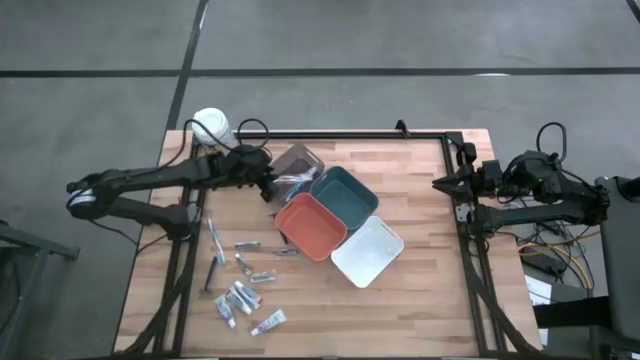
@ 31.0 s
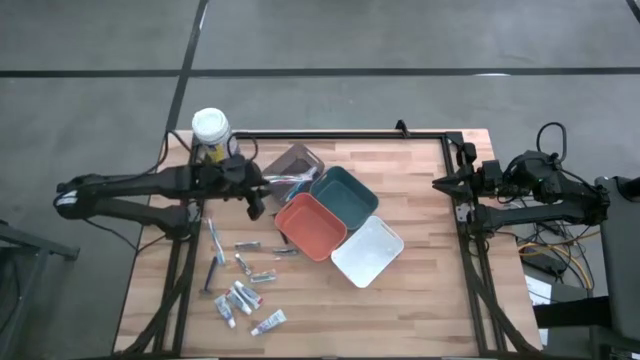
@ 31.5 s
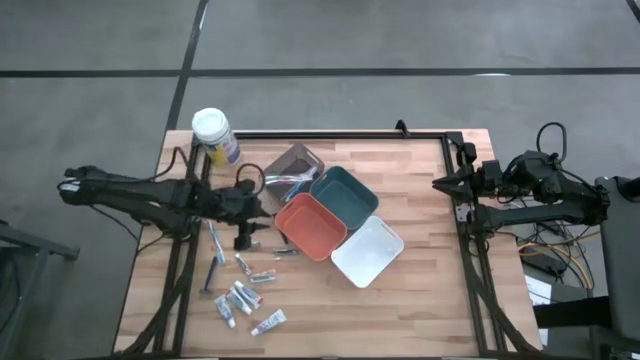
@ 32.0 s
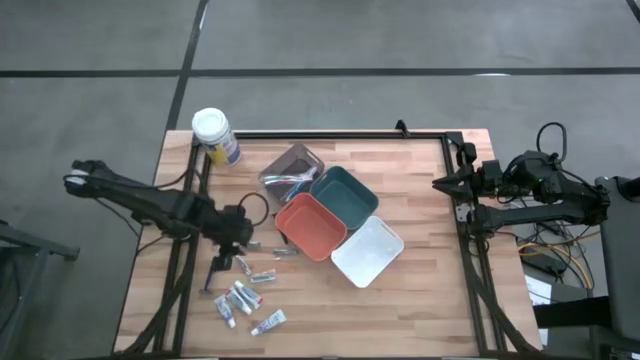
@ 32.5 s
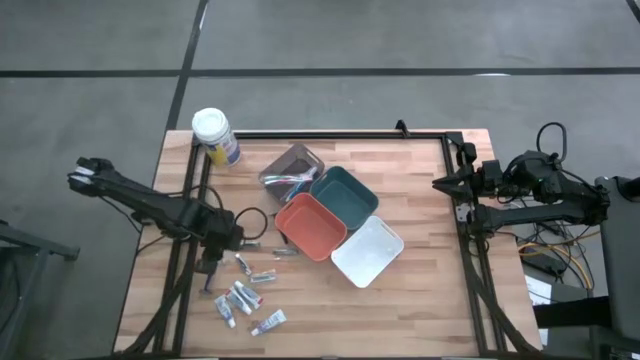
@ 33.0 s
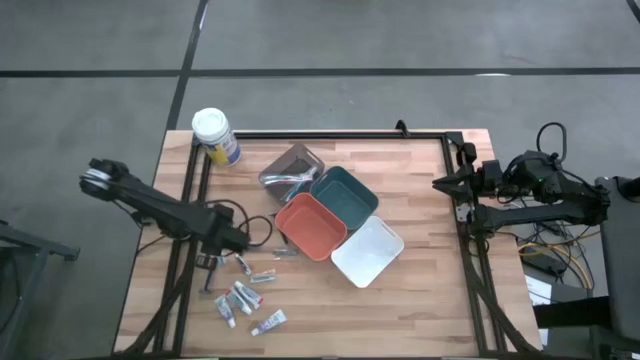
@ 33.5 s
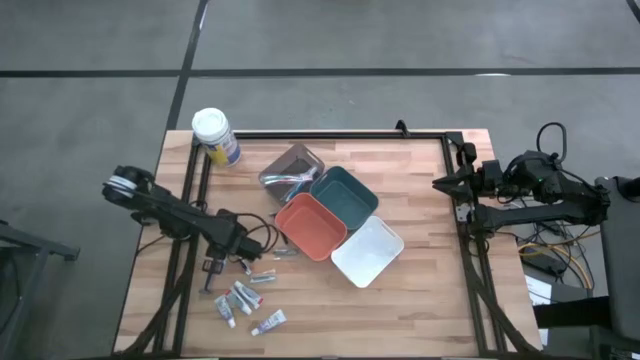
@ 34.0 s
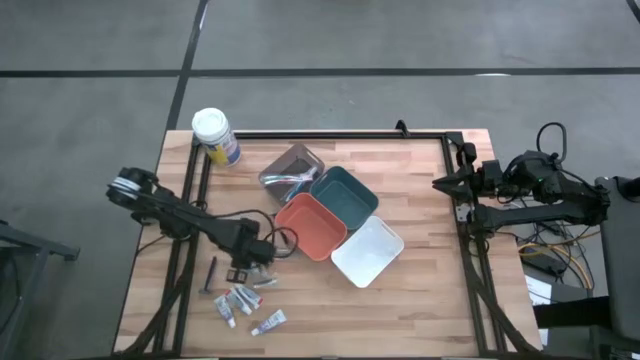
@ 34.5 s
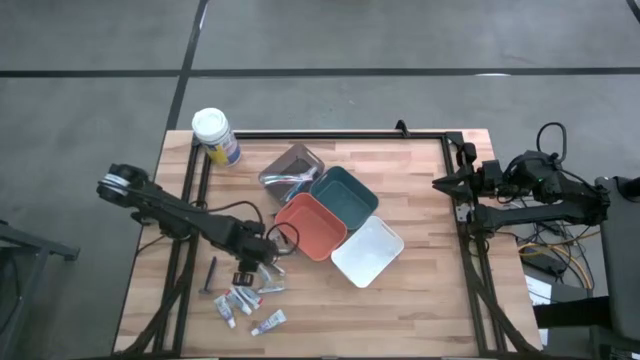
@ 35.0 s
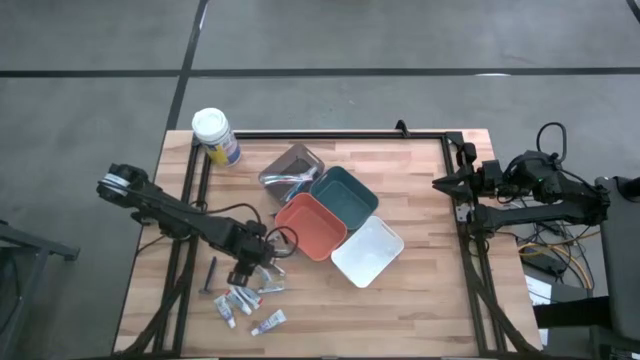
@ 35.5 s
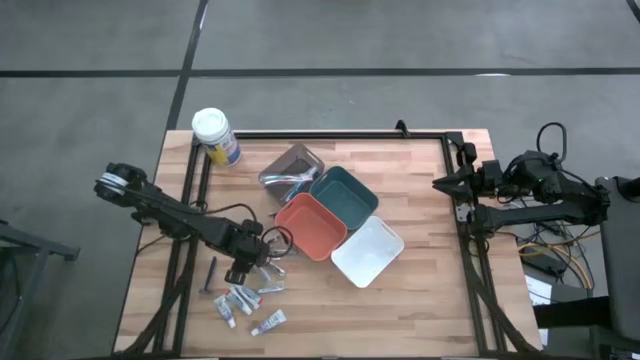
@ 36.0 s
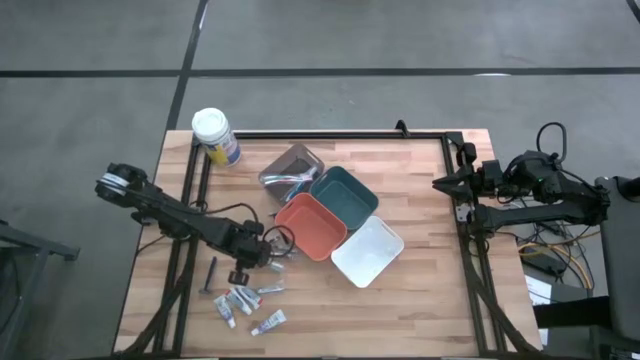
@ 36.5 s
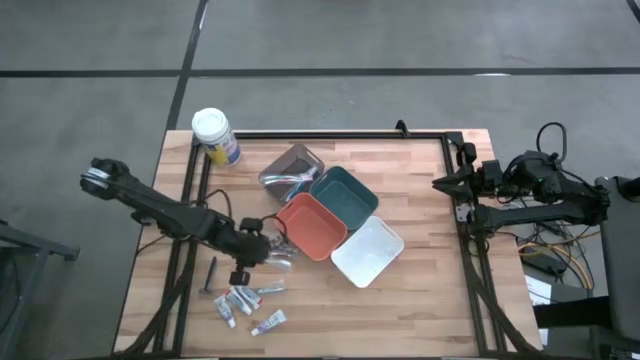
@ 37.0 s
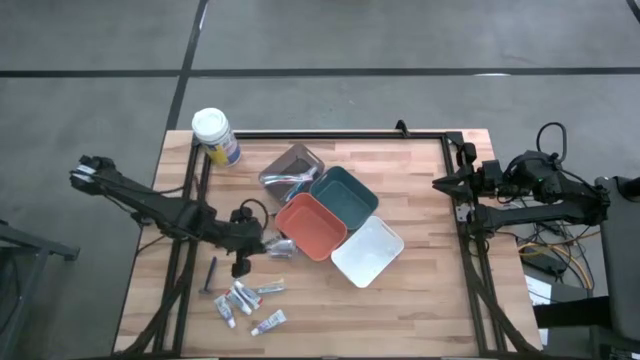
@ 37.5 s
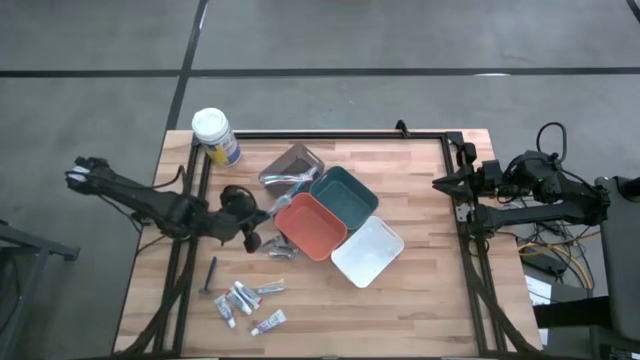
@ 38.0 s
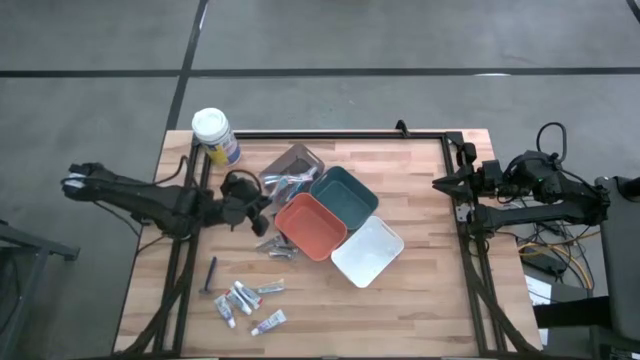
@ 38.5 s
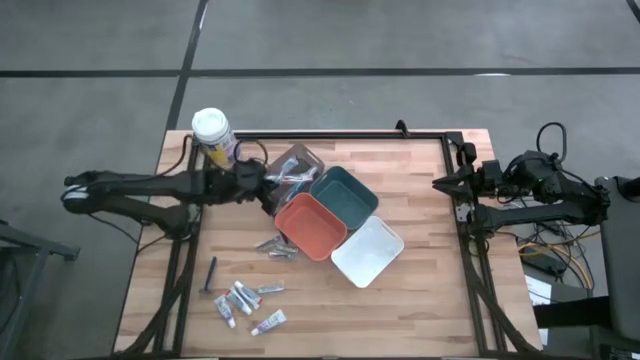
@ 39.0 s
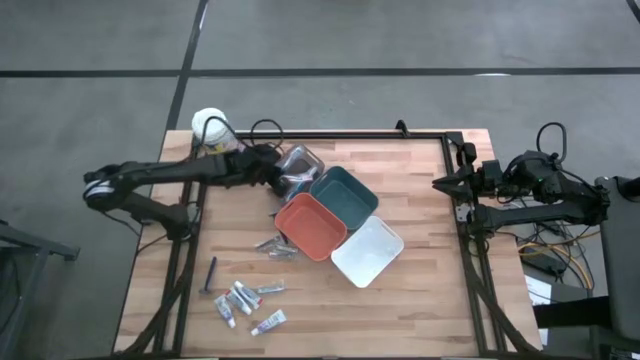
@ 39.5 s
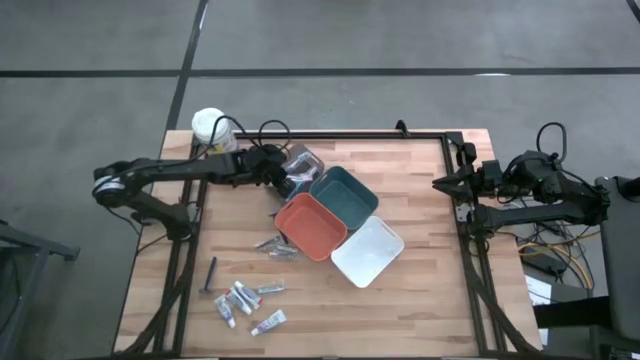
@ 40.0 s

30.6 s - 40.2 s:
Task: Pick & Place Travel size toiletries
Put the blue toothbrush into the black bin

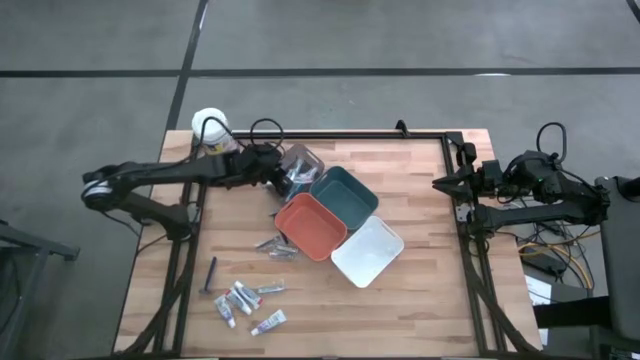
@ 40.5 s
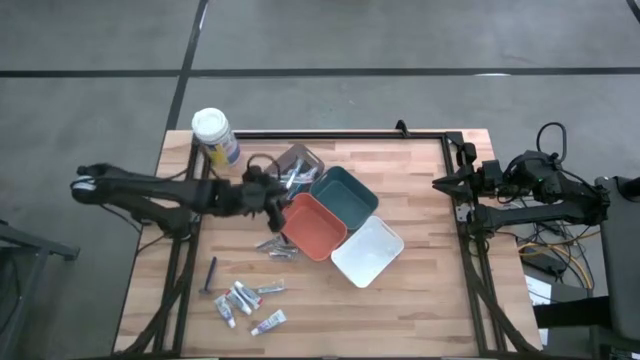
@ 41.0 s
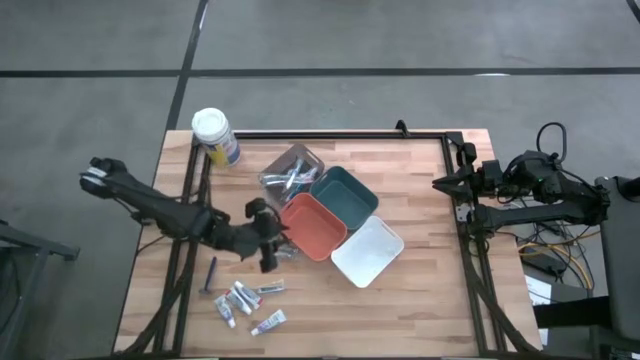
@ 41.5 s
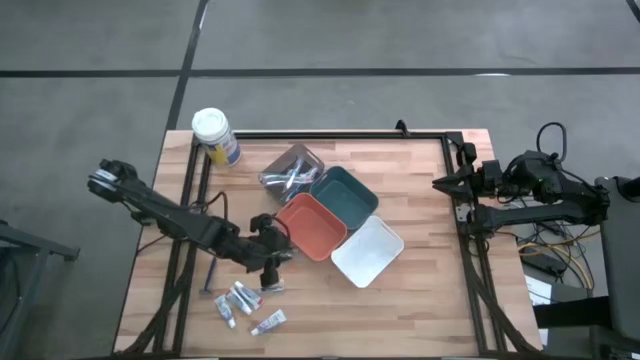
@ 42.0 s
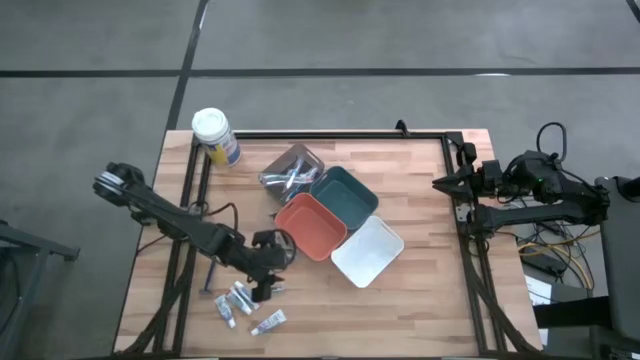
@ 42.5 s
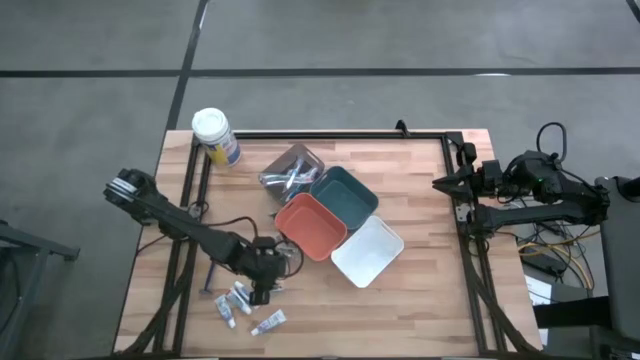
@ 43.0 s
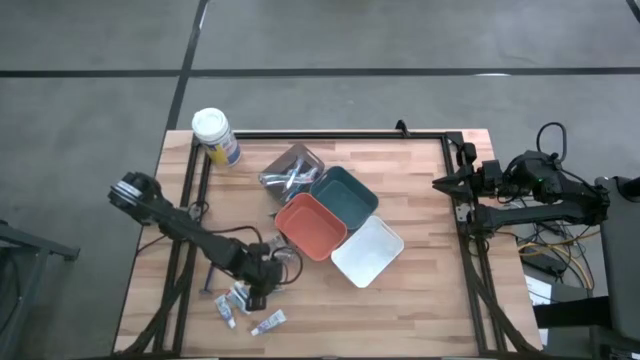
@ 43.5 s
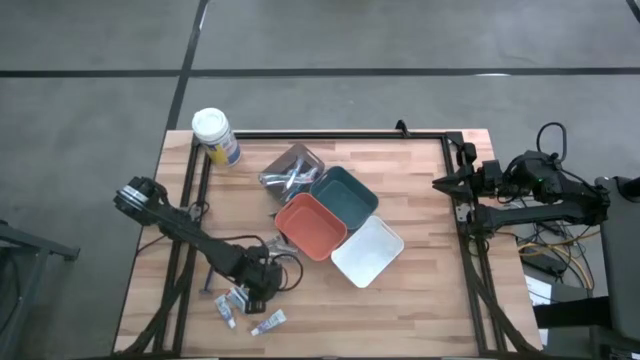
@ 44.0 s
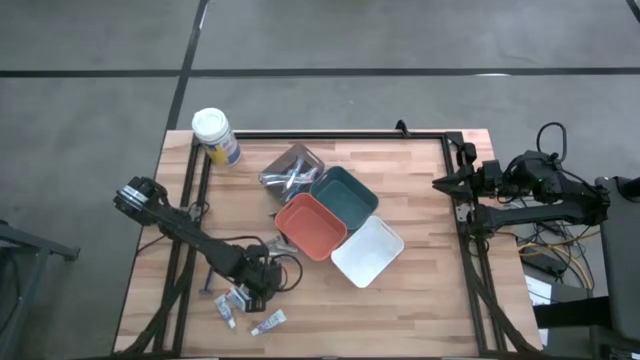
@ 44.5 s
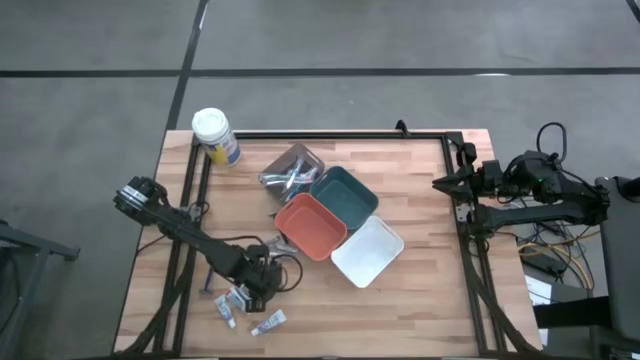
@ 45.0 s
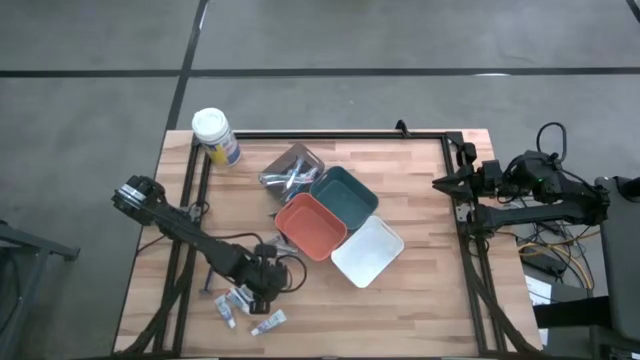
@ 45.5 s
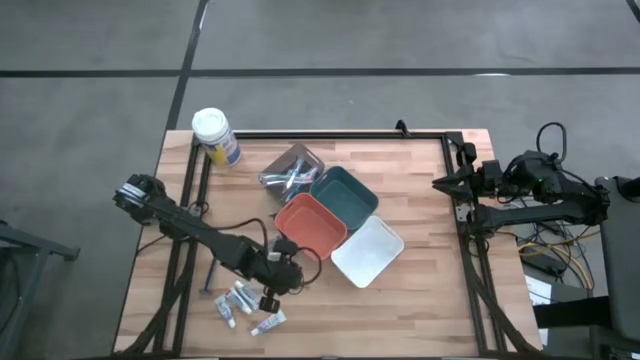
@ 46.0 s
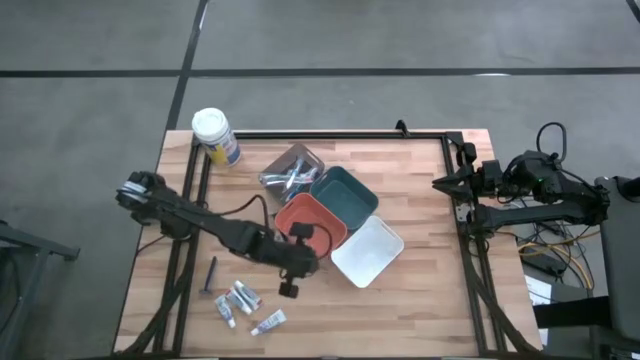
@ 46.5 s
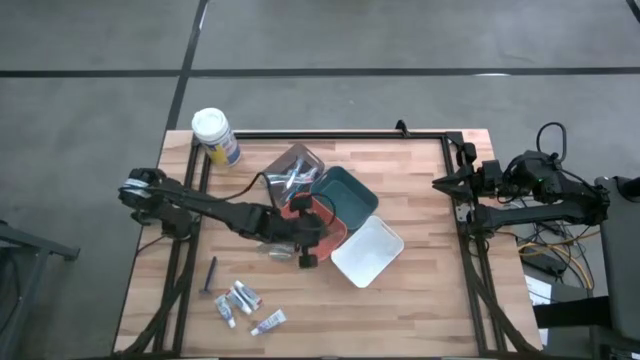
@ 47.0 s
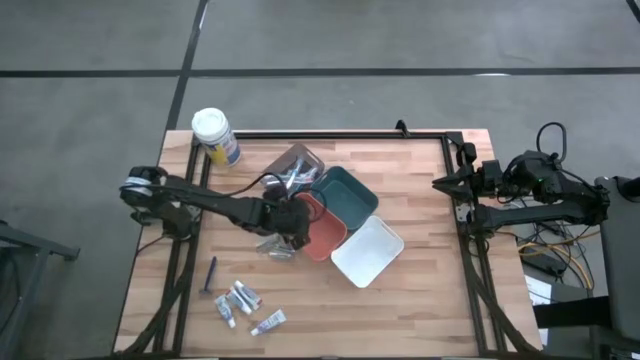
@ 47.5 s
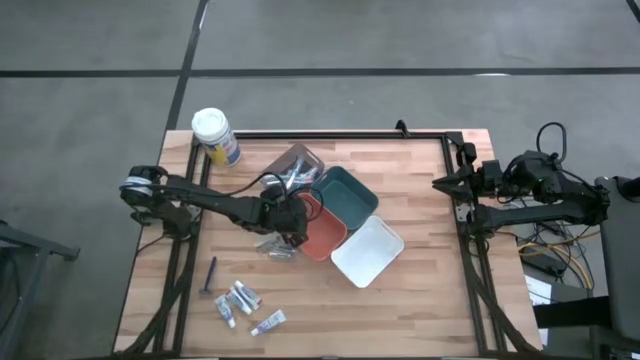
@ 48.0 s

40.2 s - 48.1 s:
Put the nail cutter into the orange bin

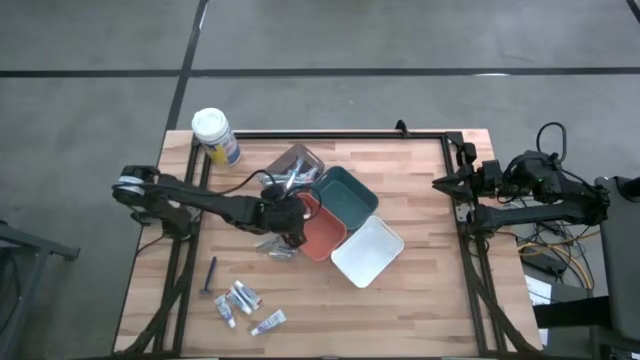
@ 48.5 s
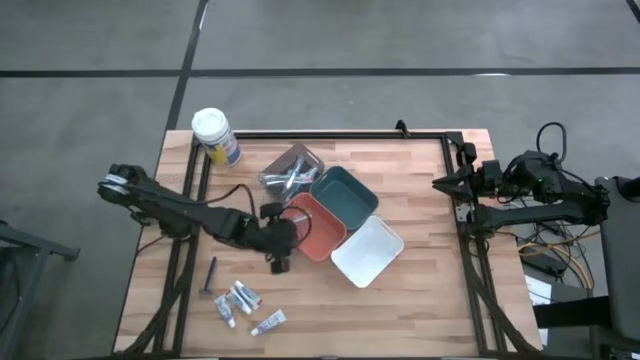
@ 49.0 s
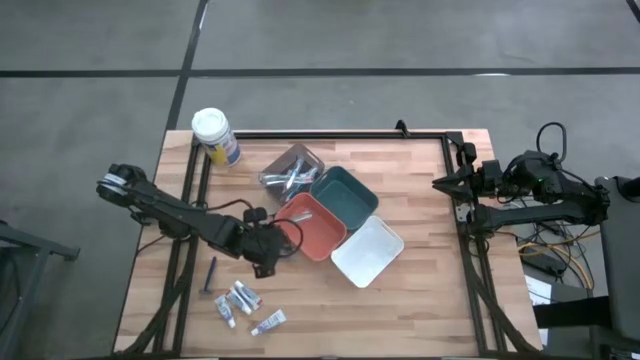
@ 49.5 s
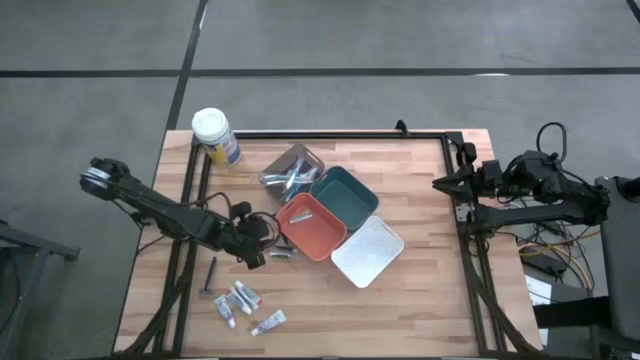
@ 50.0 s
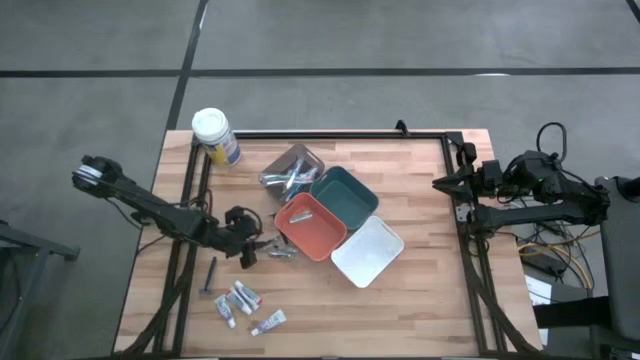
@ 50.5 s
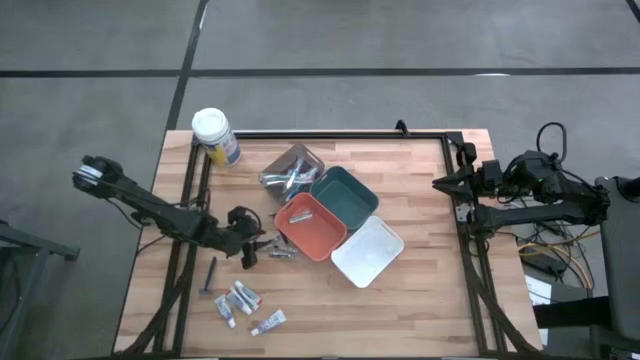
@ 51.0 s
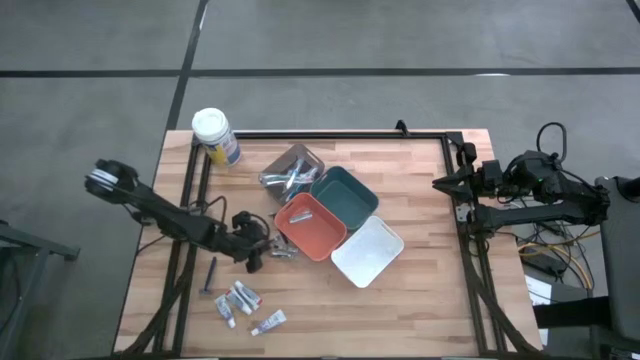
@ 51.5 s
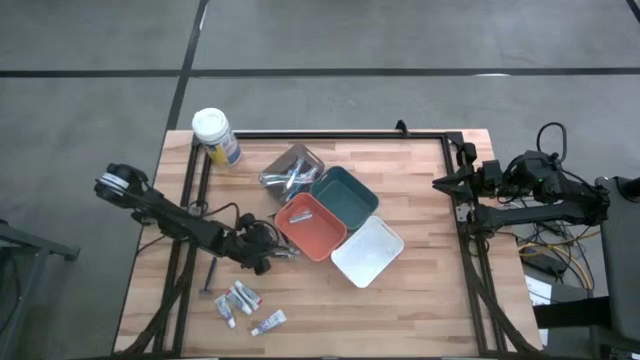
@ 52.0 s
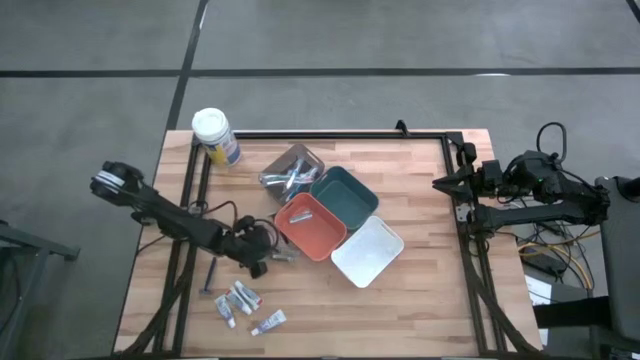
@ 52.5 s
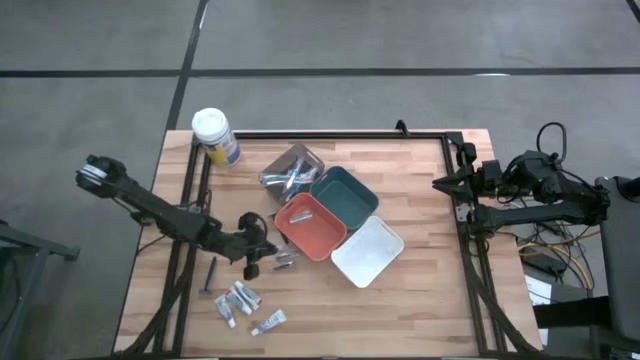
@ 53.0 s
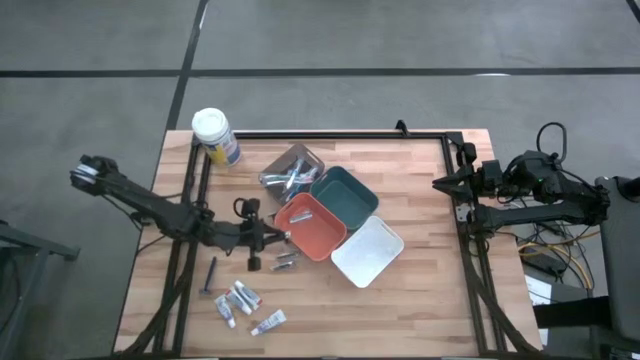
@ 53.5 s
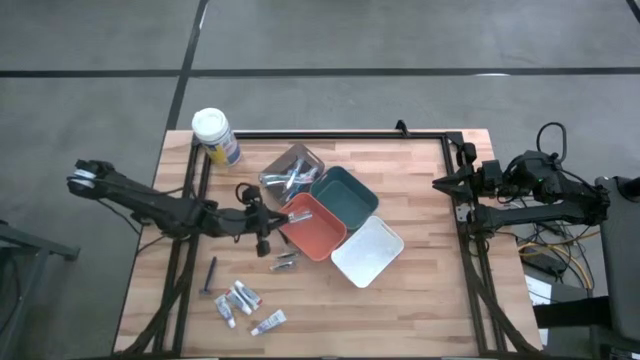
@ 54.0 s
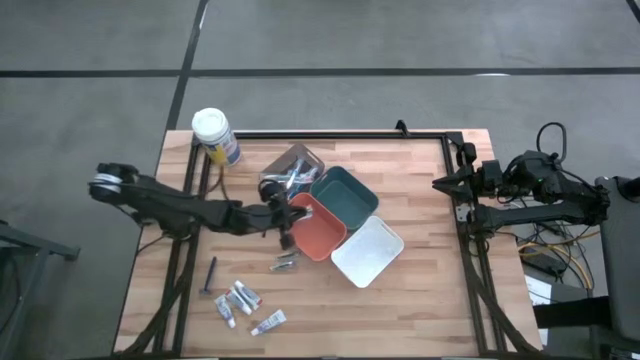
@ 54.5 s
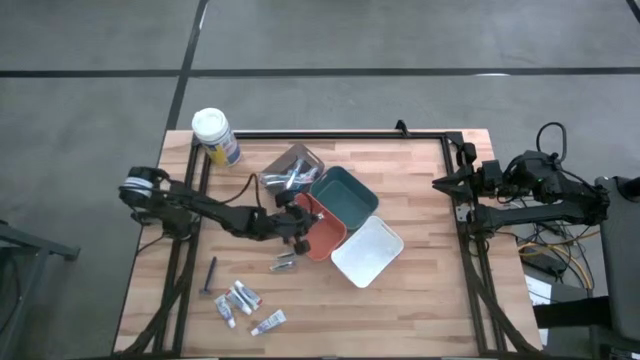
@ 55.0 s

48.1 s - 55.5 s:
Put the nail cutter into the orange bin
